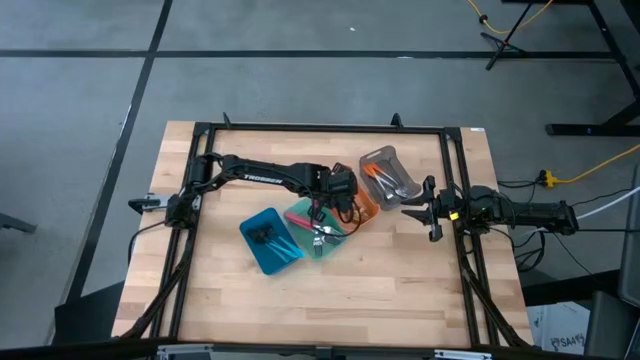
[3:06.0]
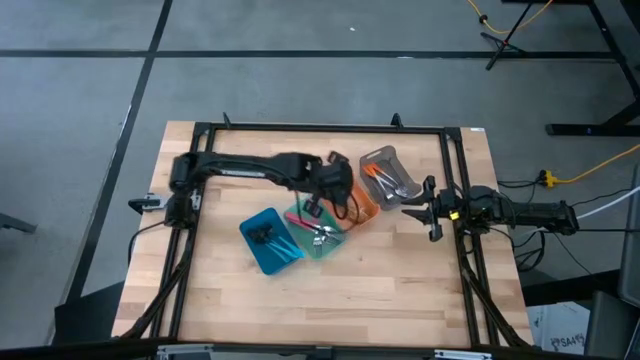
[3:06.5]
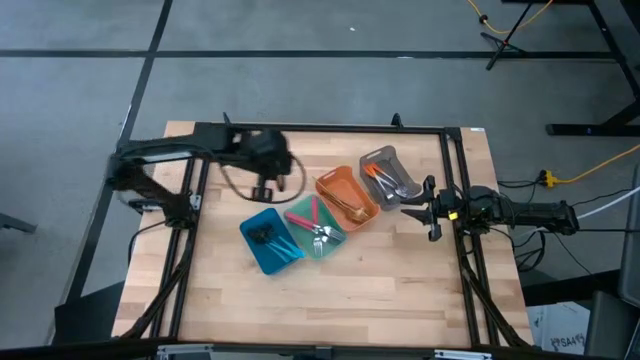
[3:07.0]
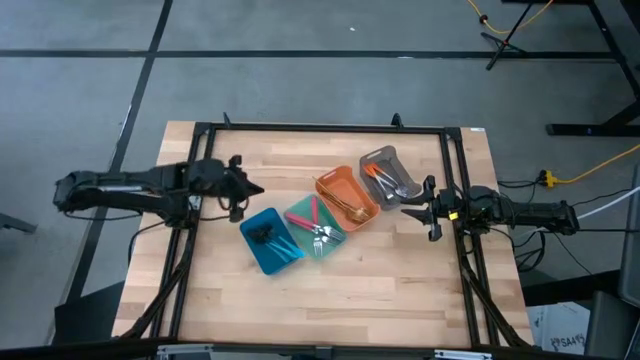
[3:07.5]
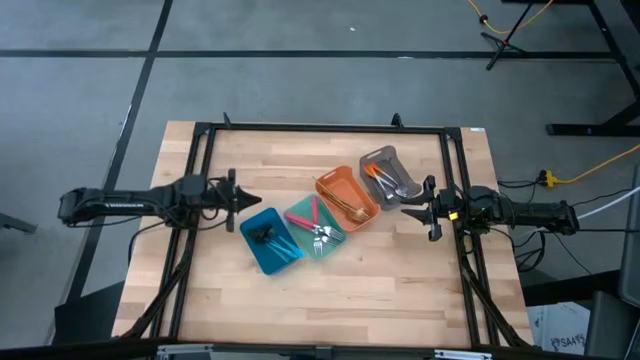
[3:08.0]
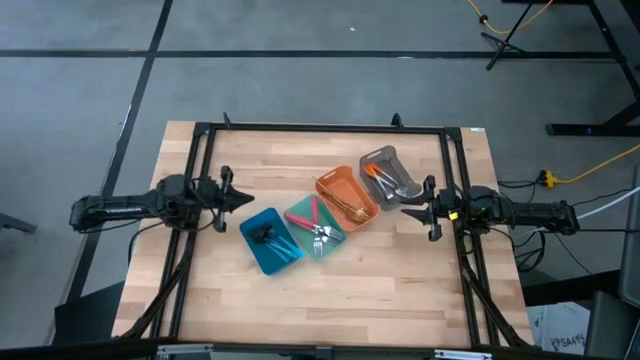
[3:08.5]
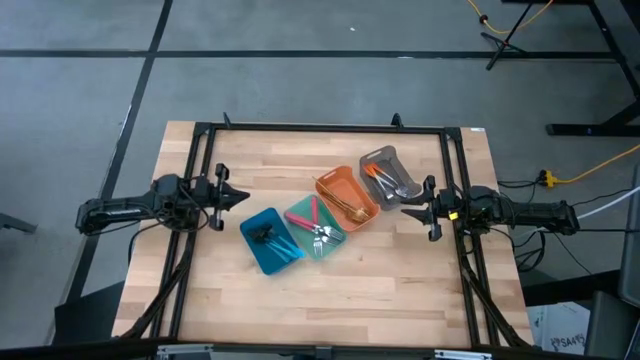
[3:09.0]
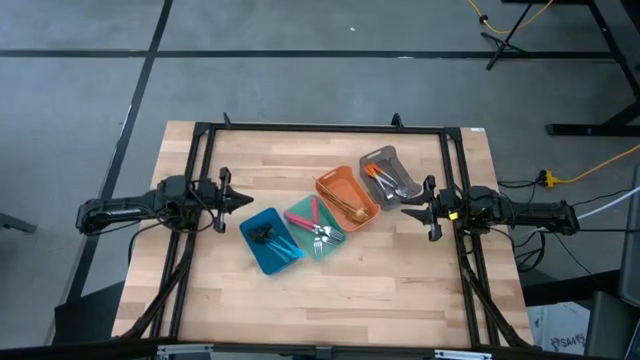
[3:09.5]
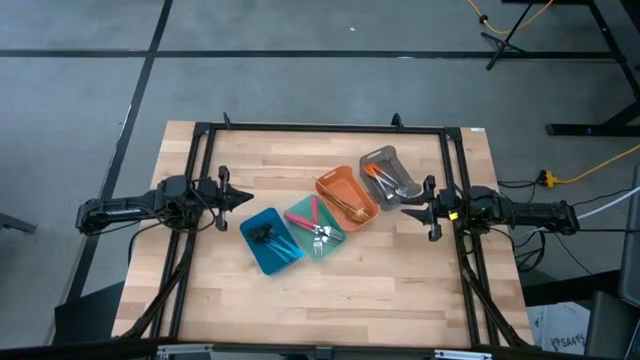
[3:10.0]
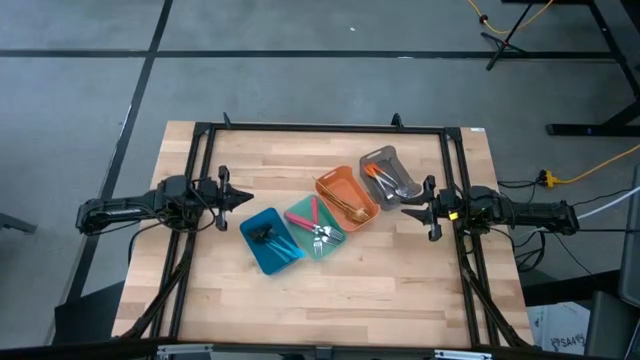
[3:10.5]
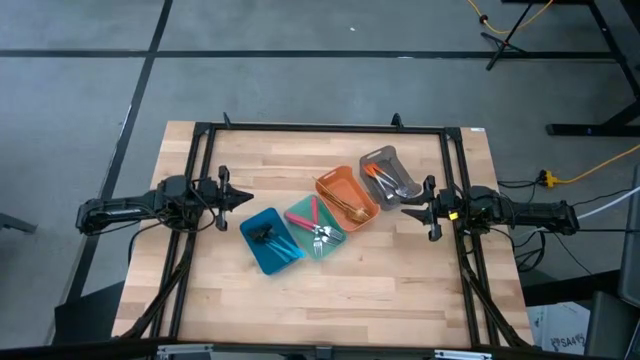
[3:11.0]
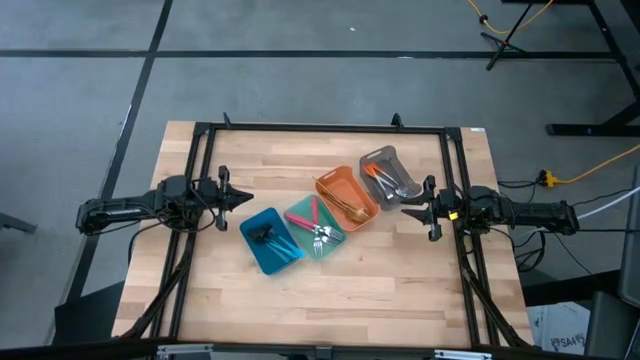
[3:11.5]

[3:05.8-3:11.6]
Task: Sort silverware by color (type)
Return to Home Position

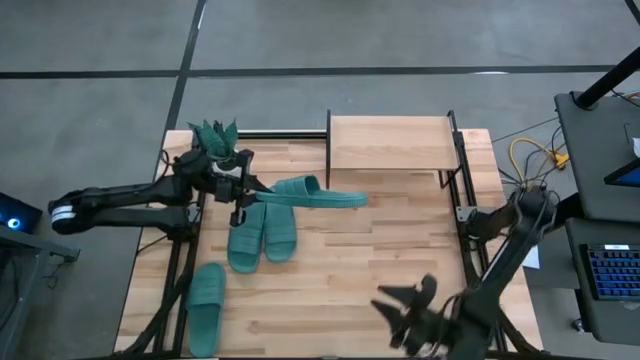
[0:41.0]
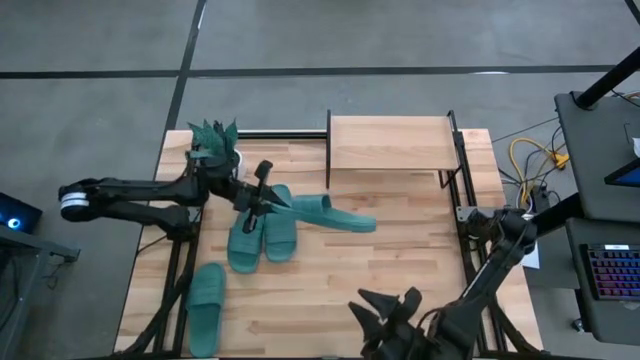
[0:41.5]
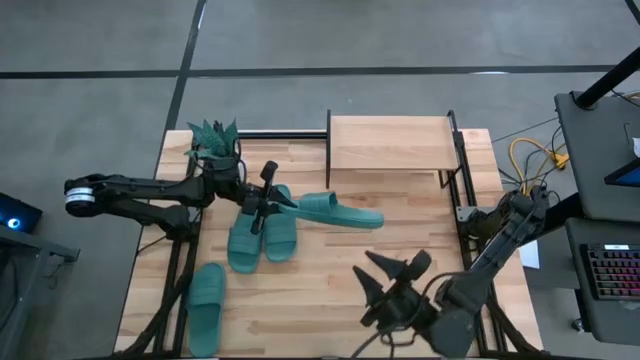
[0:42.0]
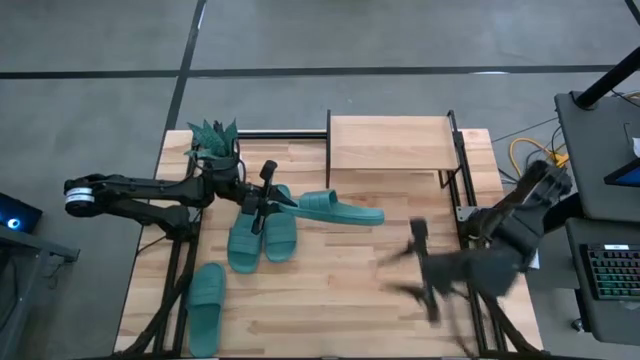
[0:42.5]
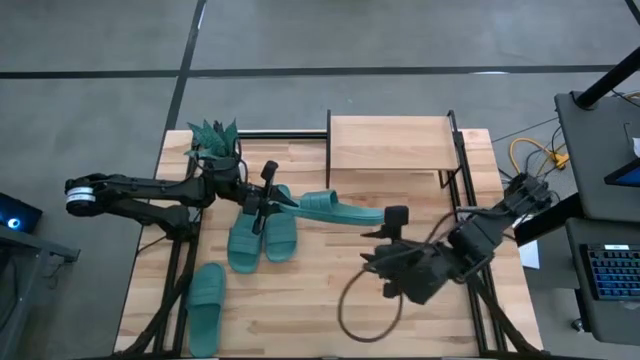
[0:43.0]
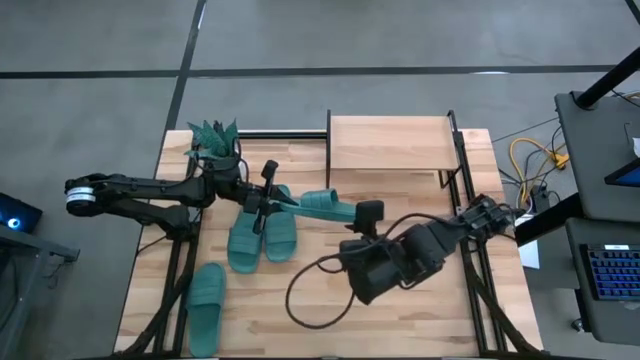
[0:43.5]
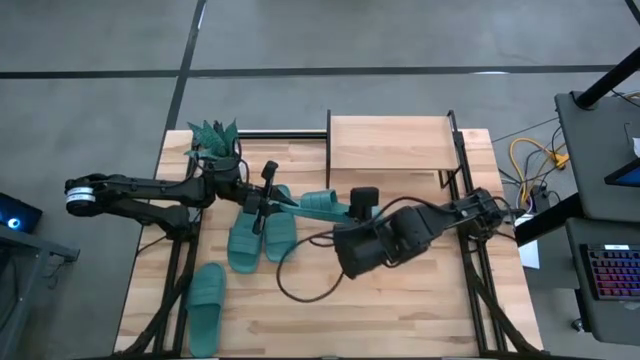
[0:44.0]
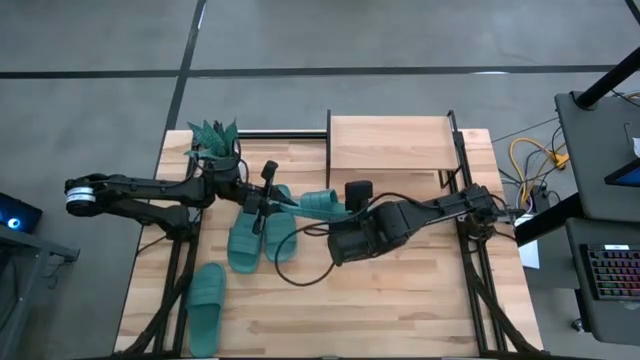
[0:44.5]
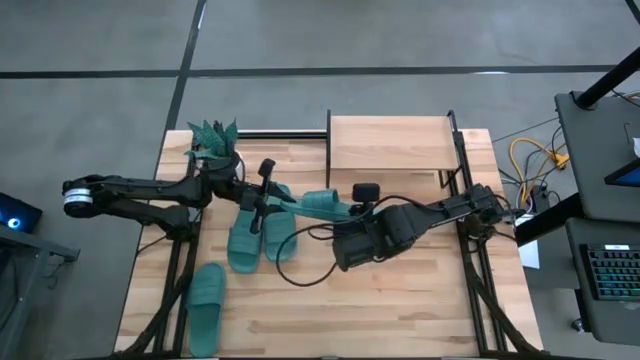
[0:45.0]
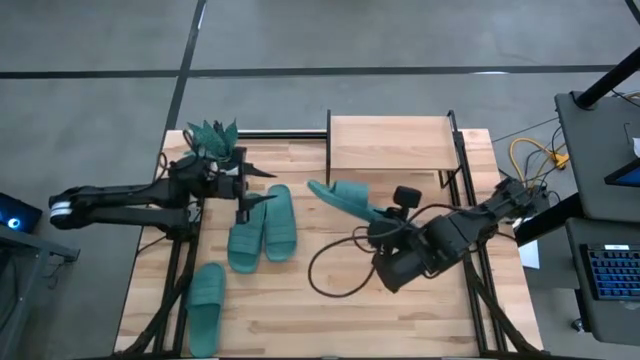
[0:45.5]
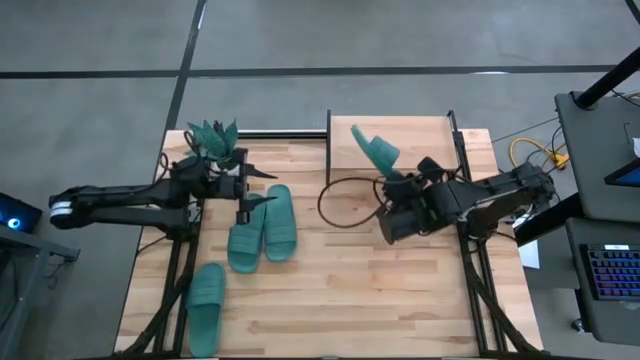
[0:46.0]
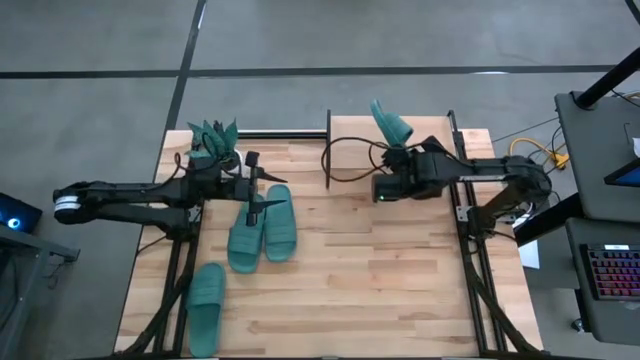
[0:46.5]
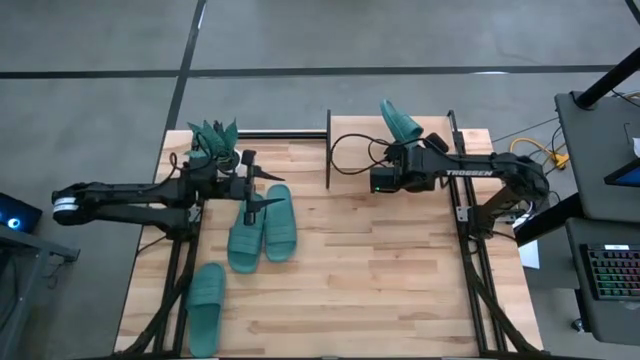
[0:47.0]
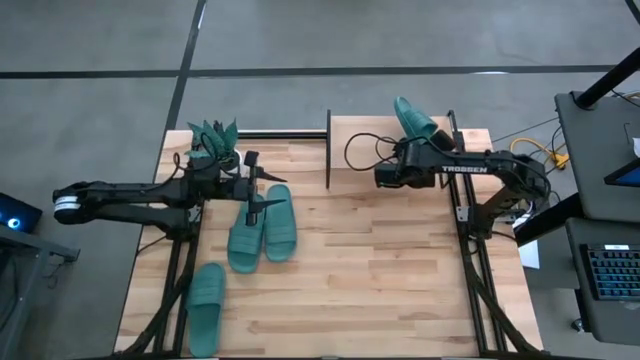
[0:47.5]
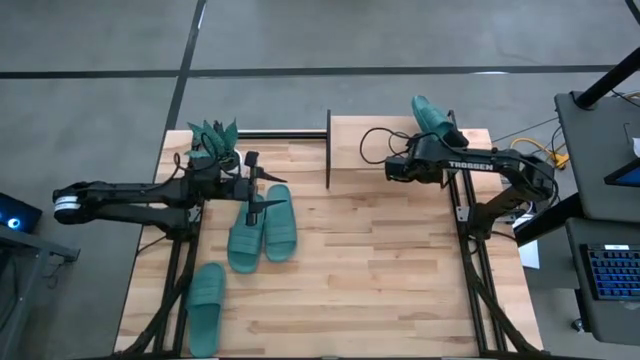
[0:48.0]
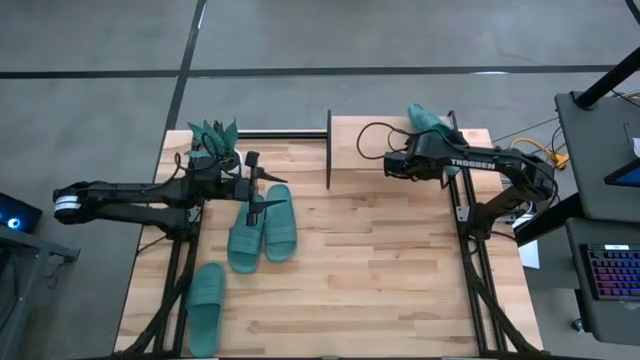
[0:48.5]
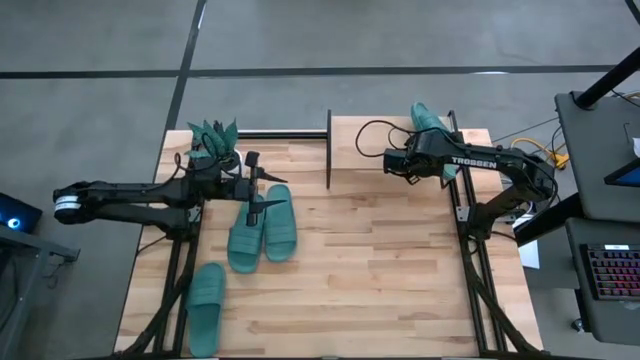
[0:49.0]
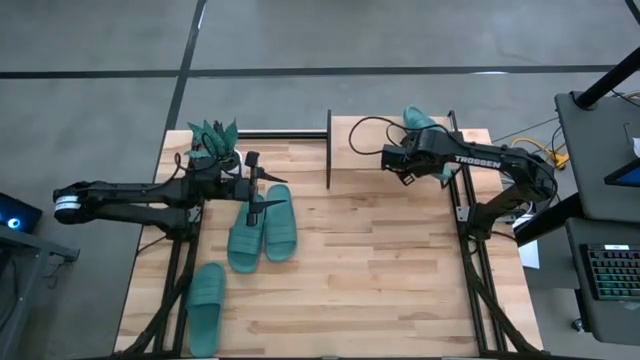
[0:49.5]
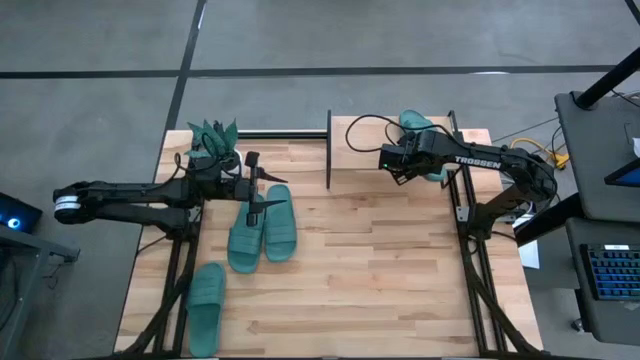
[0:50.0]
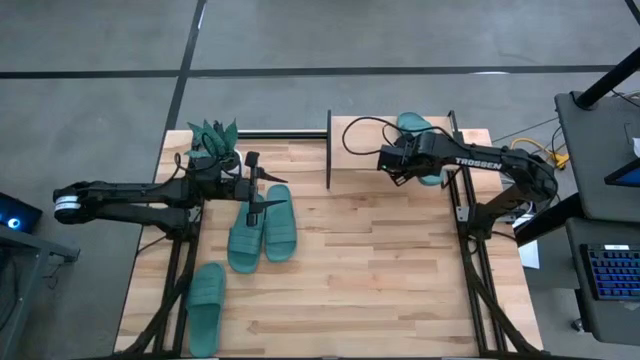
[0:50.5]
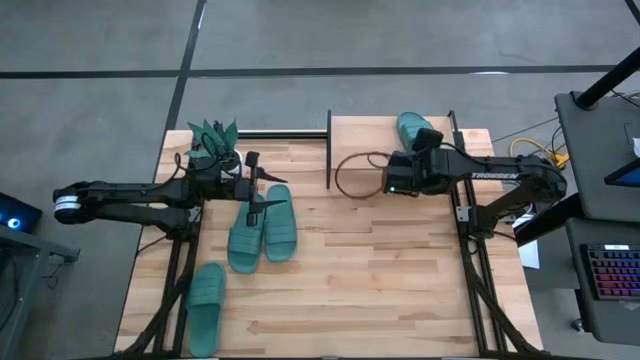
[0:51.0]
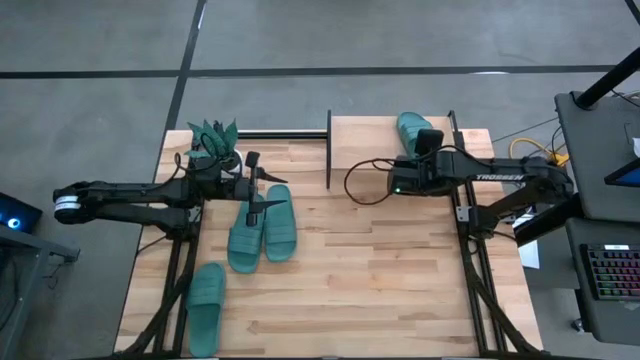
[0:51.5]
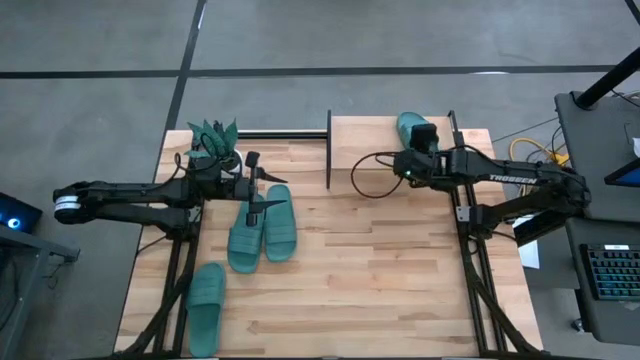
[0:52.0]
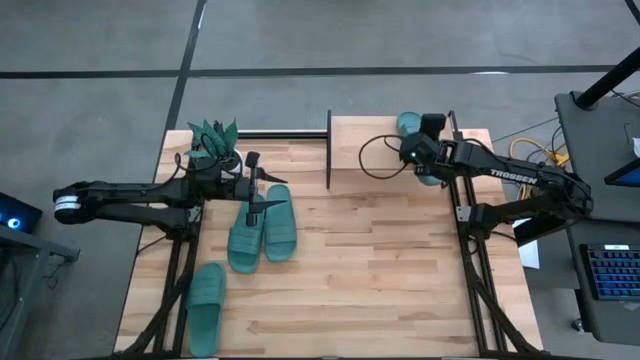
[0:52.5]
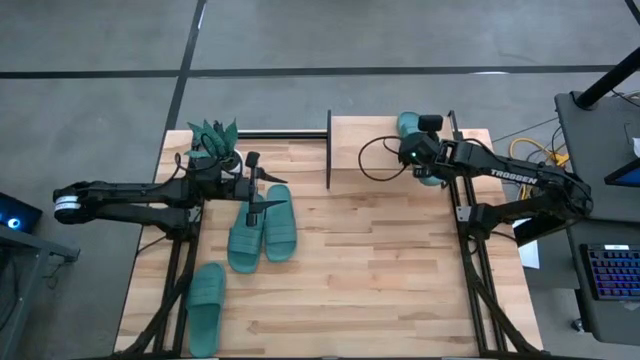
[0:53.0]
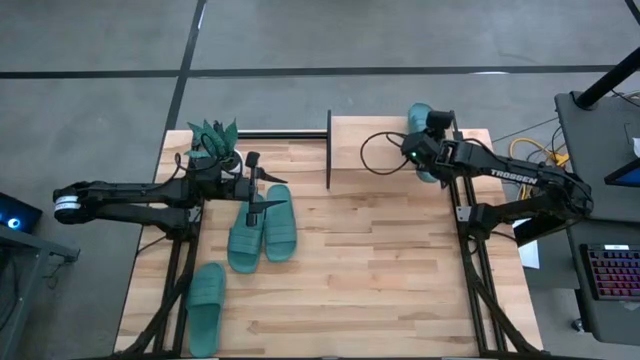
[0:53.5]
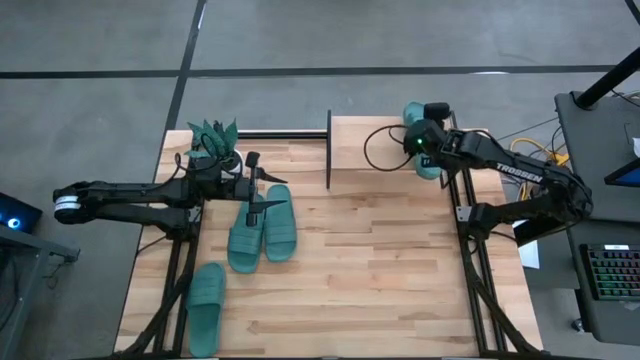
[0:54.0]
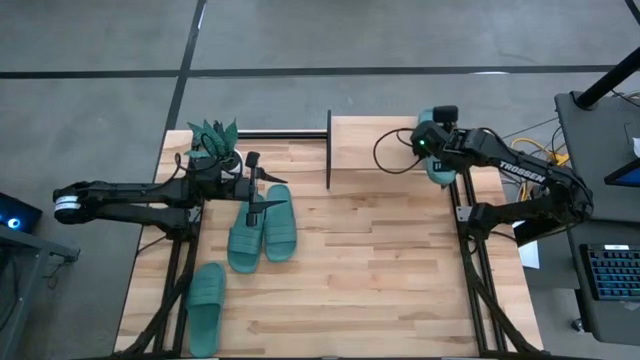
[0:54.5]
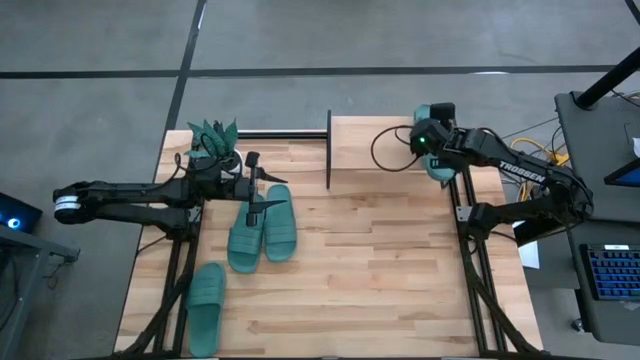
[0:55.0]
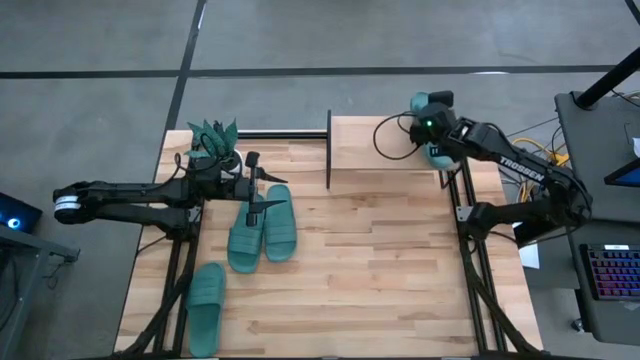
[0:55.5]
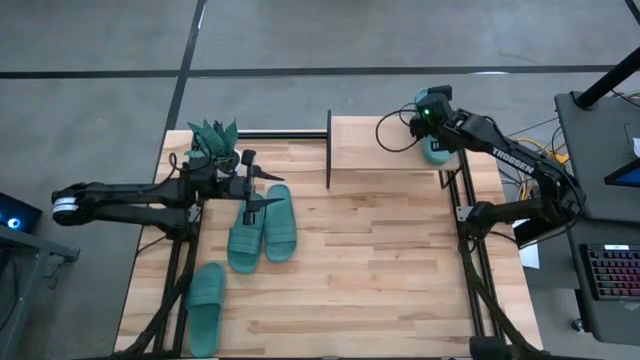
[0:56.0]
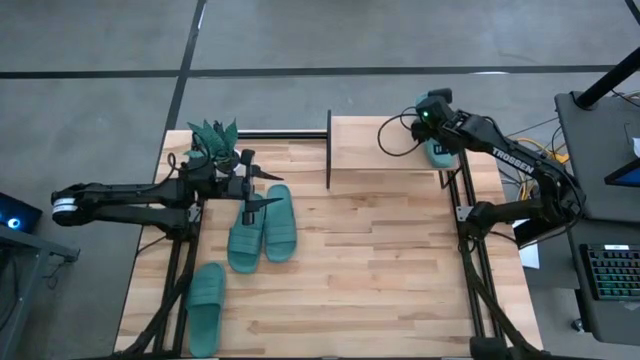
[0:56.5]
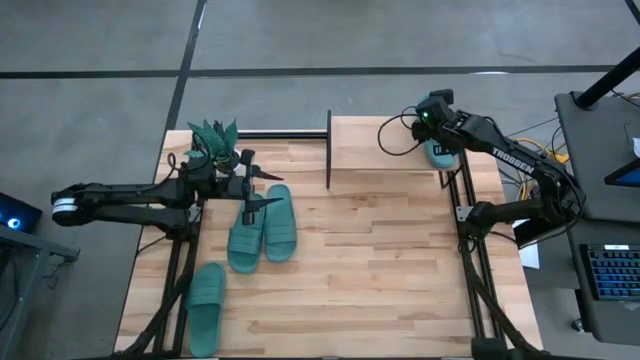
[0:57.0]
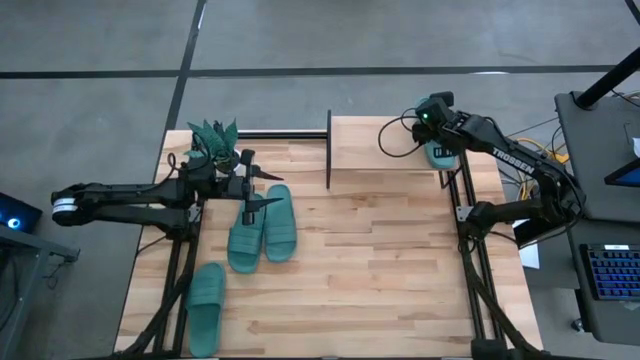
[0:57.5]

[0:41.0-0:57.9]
Task: Pick and place slides into the shelf
Put the bottom right green slipper on the shelf
